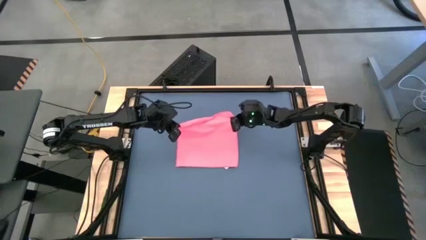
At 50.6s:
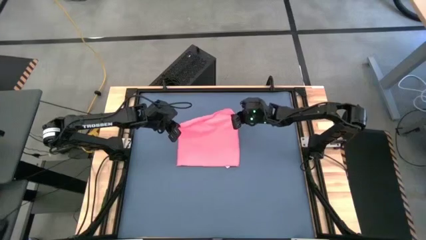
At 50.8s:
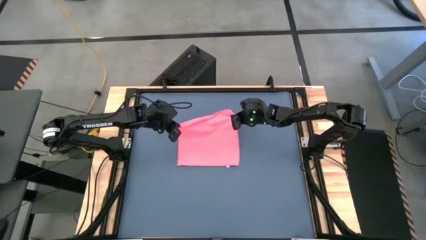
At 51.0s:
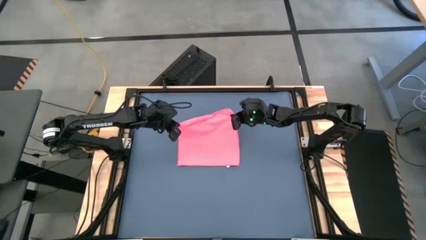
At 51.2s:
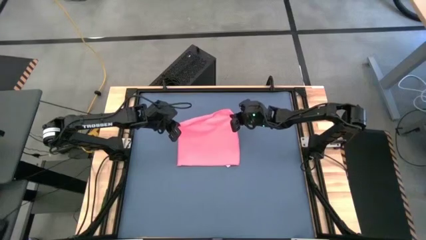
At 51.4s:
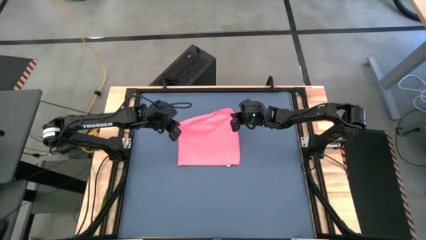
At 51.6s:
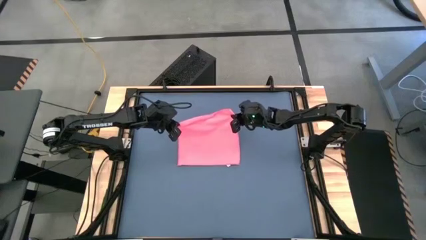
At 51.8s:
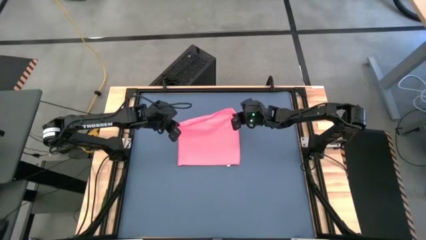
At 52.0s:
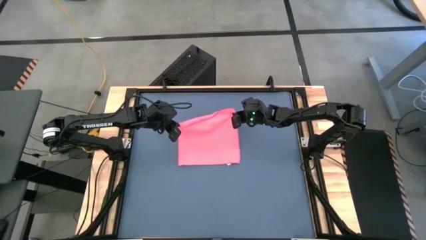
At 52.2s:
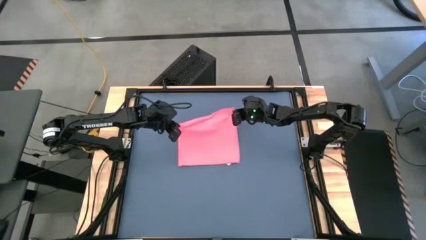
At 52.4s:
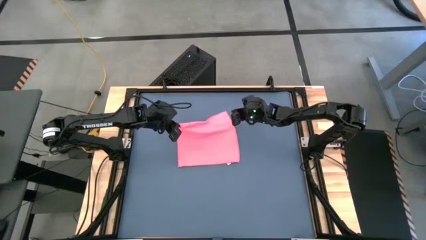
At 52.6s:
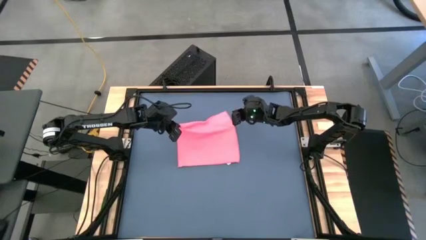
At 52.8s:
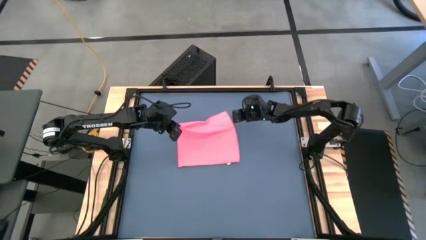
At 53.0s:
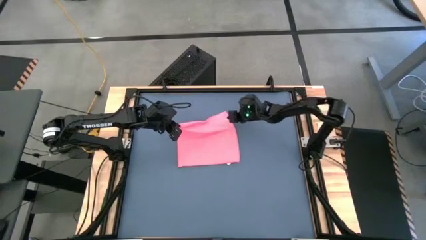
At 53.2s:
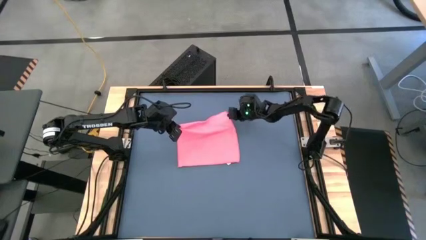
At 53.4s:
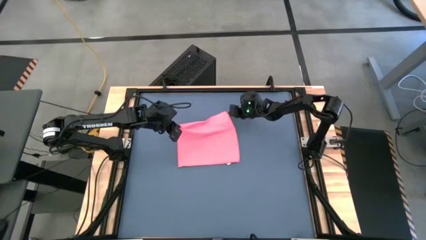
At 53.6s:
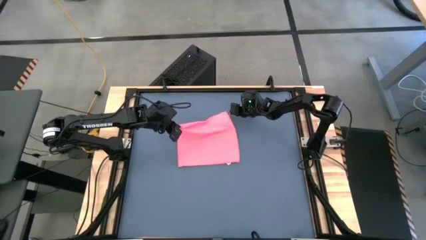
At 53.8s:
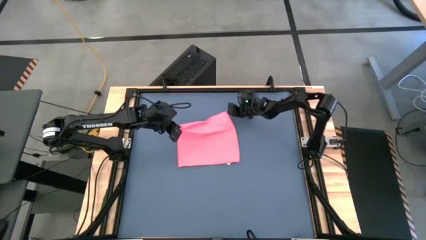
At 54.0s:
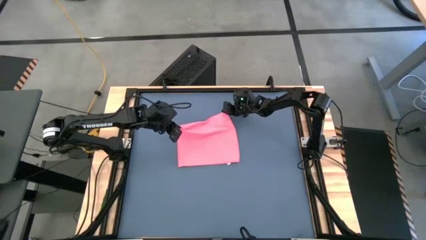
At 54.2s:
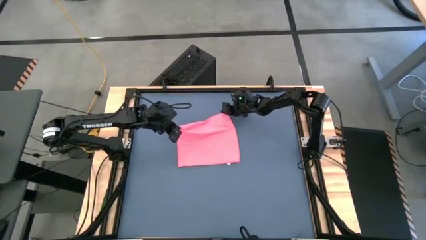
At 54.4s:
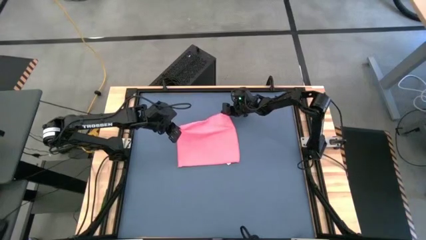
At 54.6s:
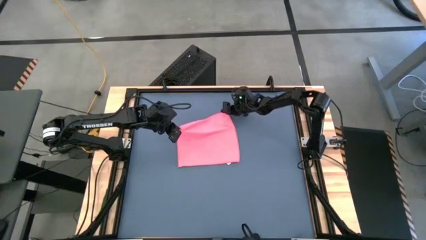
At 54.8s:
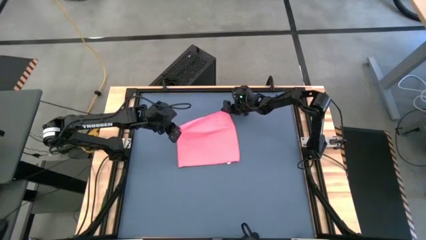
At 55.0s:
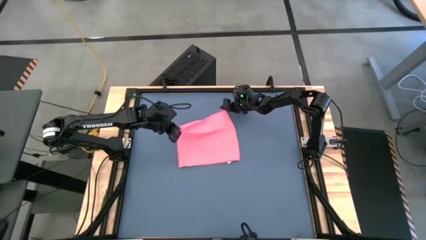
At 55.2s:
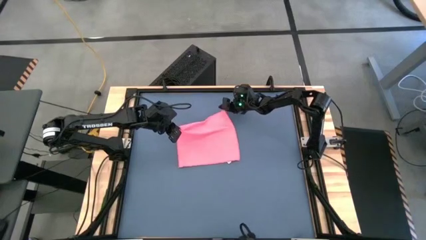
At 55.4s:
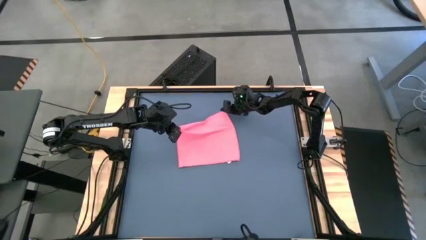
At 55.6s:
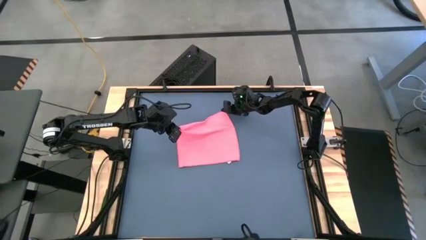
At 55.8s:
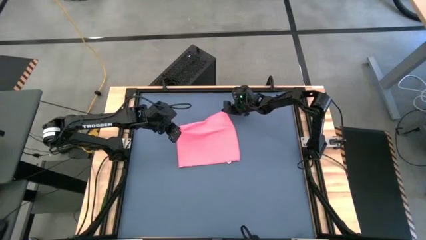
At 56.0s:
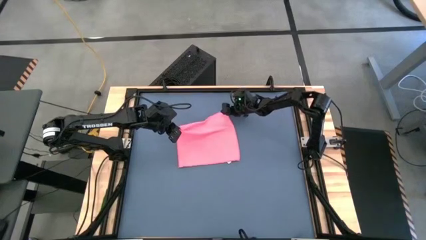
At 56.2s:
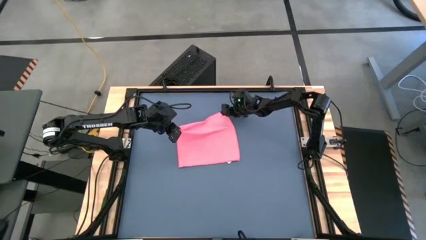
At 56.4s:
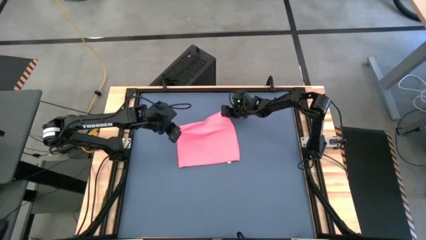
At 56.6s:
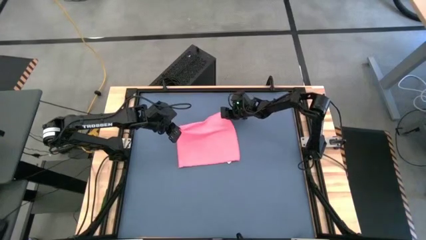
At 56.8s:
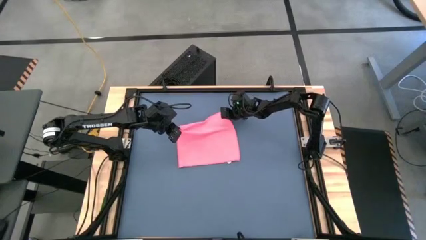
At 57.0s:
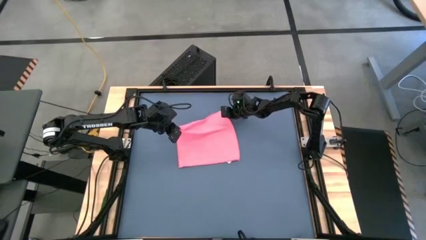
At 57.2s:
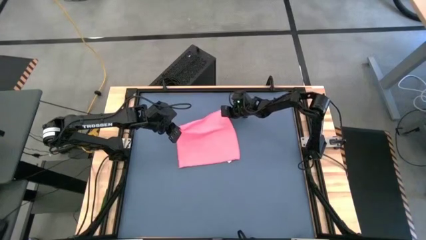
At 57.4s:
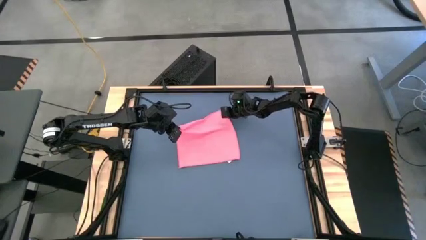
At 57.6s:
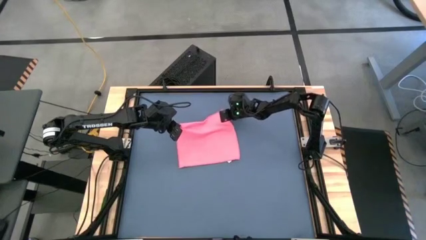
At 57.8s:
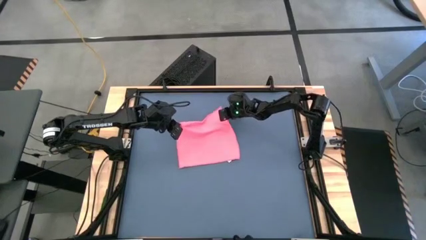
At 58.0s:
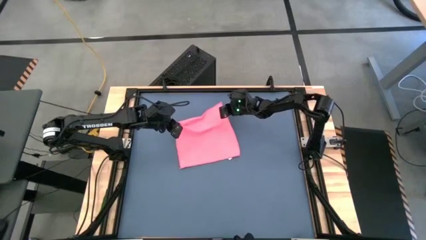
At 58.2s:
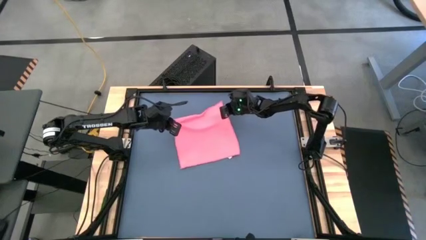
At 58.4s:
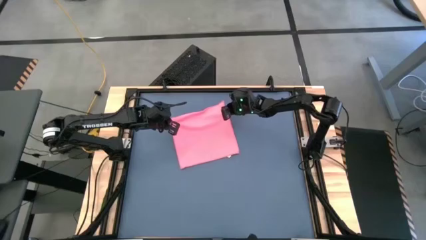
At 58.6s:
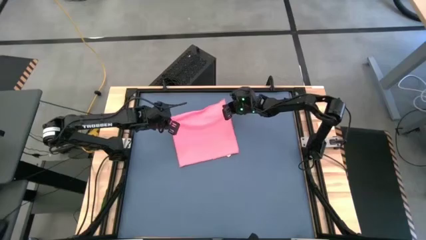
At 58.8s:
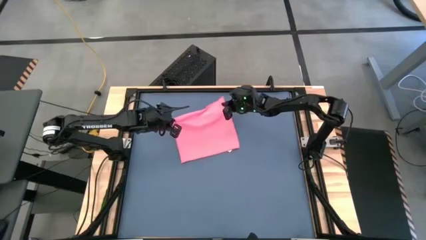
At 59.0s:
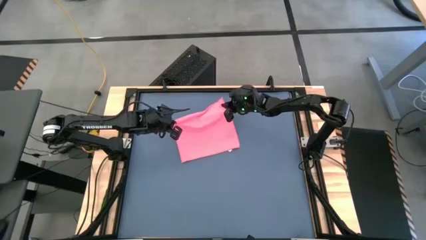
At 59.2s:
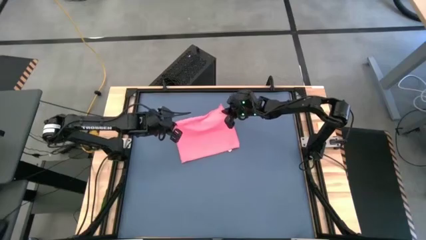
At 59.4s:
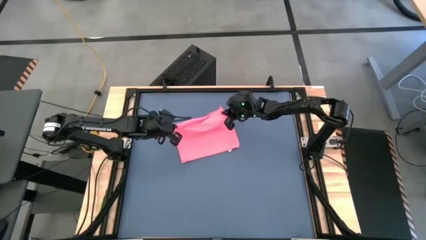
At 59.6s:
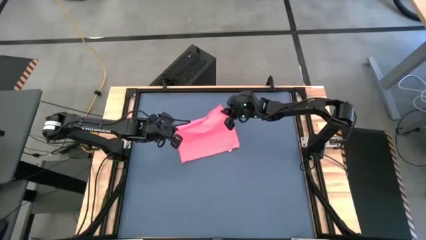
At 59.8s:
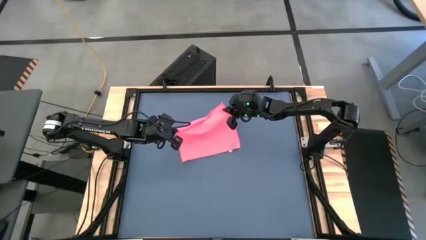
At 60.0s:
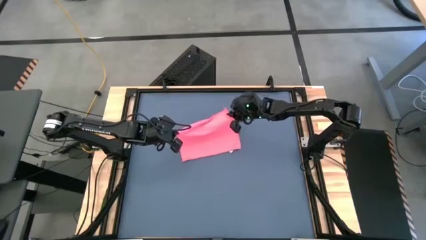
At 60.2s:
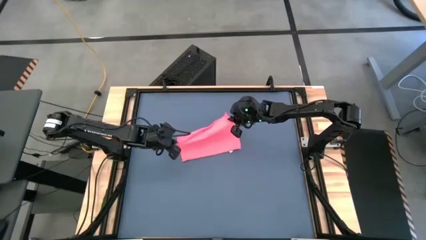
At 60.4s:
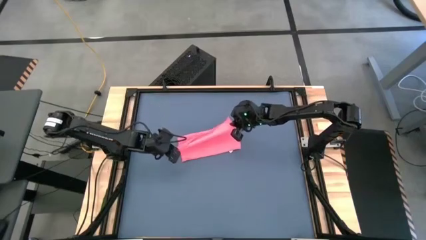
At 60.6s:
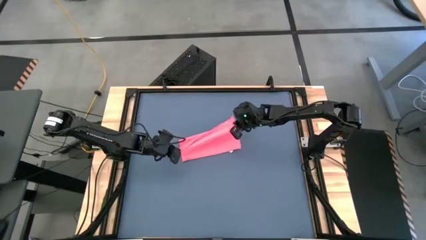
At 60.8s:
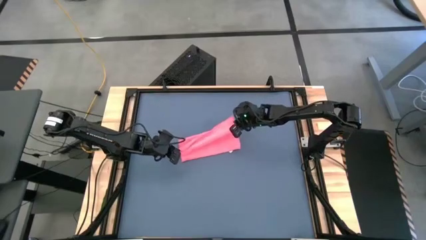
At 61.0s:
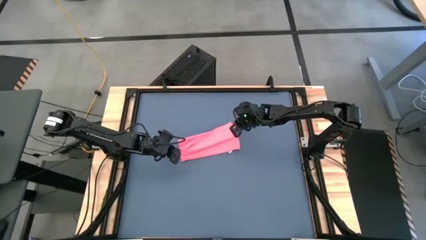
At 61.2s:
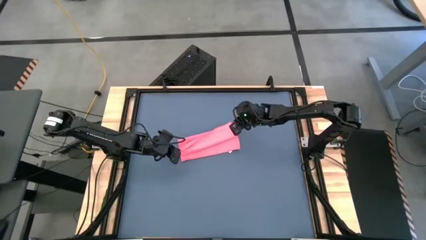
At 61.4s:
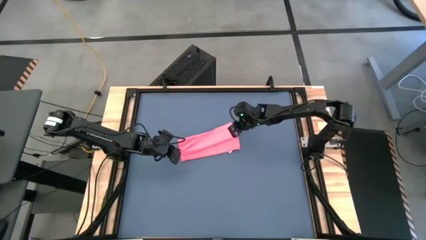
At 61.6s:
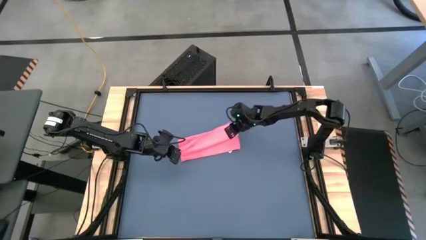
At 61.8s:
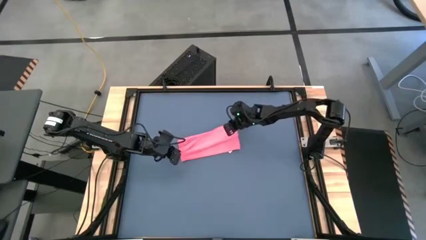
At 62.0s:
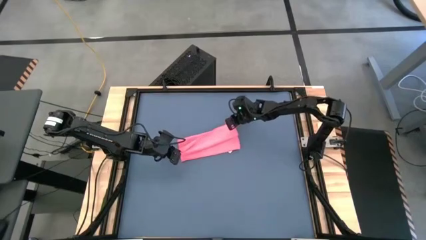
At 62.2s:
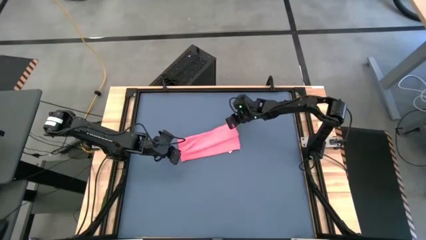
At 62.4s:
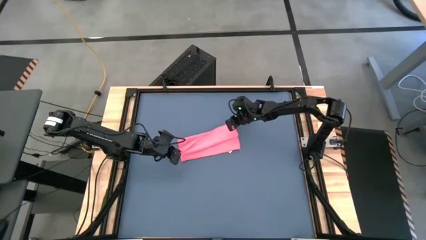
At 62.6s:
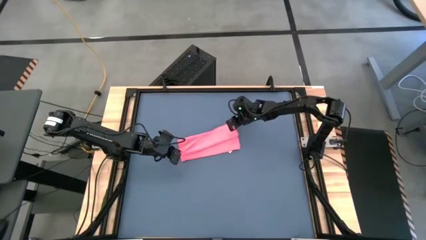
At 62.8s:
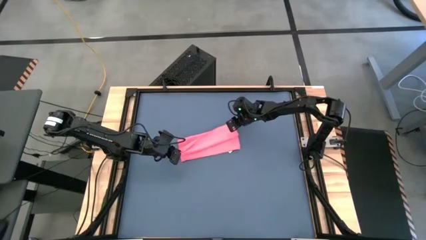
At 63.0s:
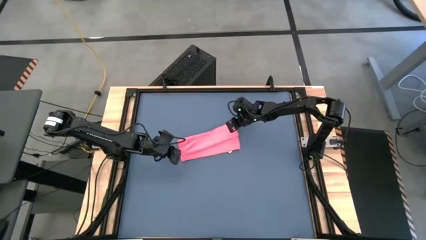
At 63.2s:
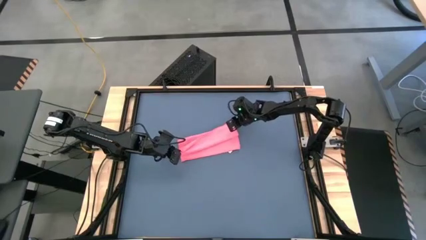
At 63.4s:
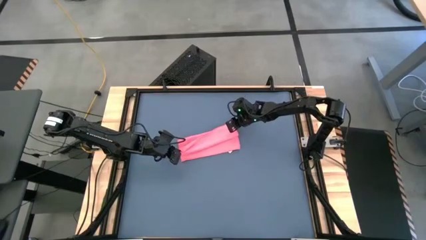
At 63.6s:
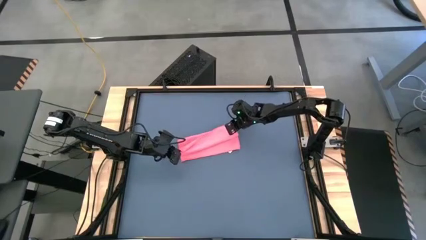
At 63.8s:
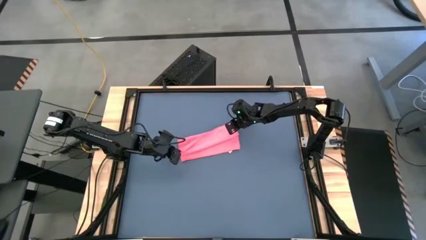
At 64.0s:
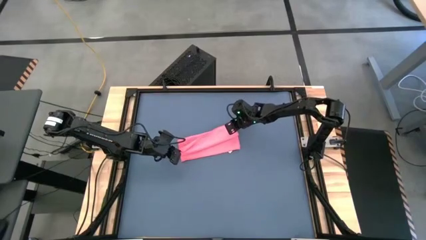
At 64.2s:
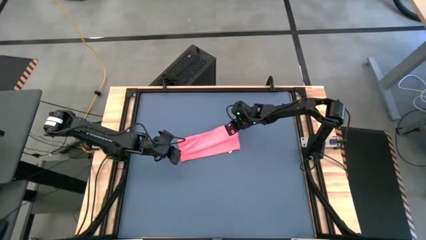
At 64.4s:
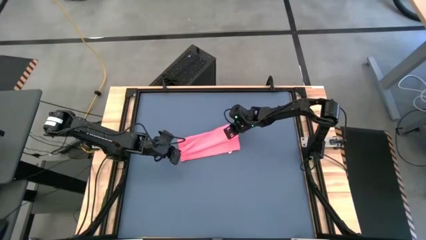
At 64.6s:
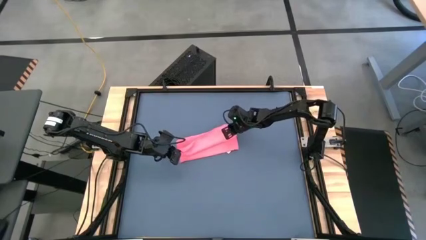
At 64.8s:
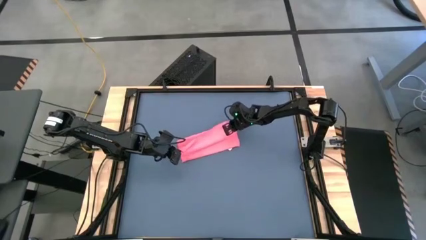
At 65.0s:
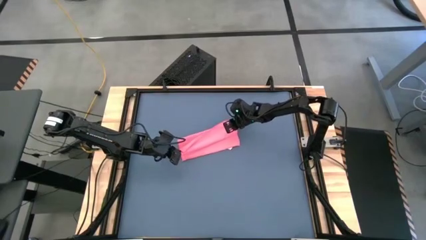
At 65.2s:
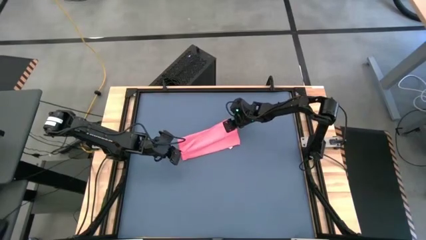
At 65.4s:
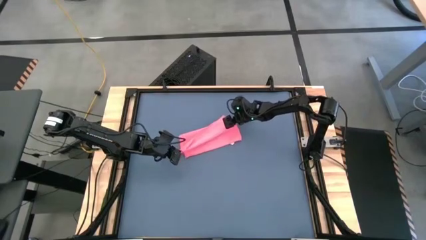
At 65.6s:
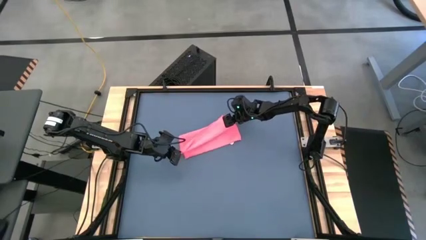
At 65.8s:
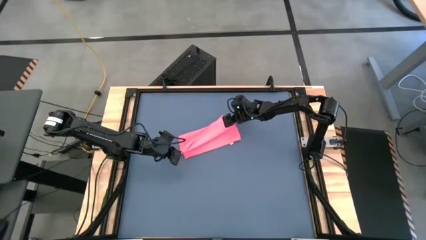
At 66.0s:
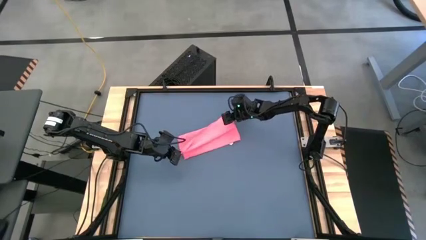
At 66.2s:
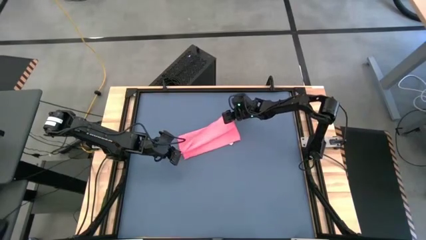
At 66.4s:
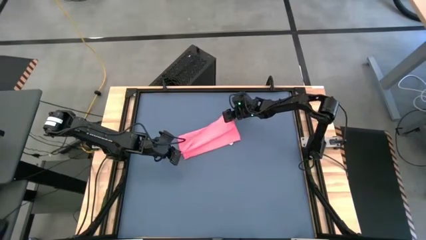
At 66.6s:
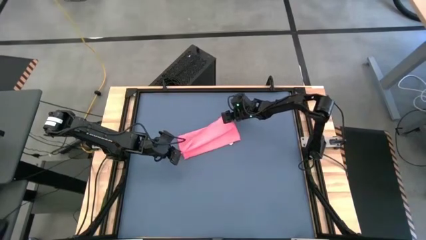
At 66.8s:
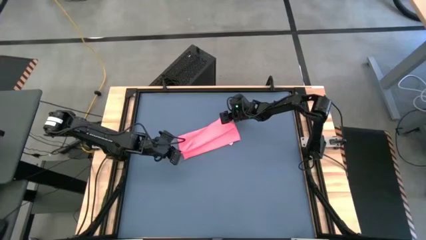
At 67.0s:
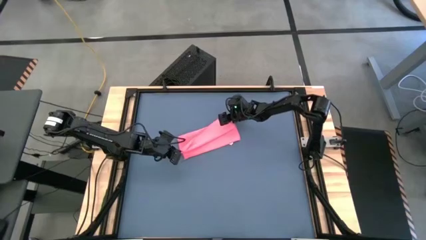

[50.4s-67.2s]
Task: Roll towel
Fold the pink towel
